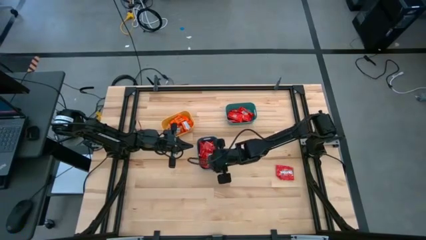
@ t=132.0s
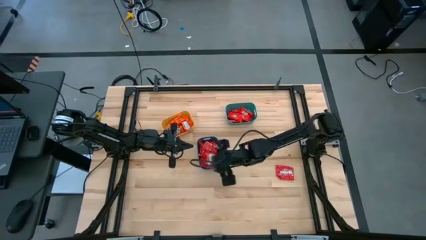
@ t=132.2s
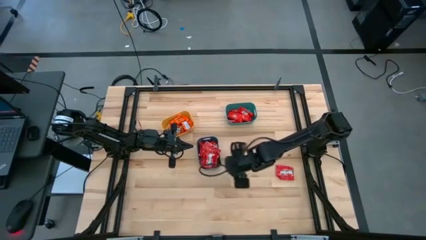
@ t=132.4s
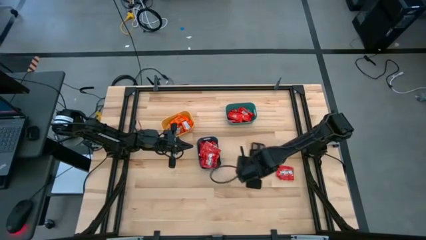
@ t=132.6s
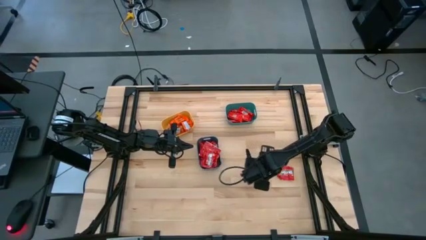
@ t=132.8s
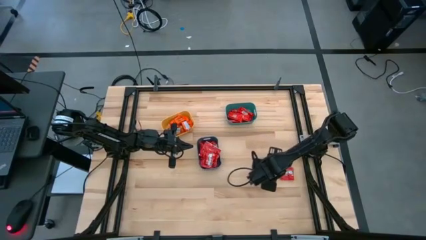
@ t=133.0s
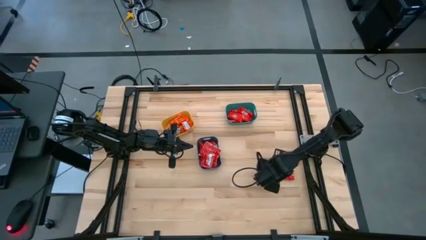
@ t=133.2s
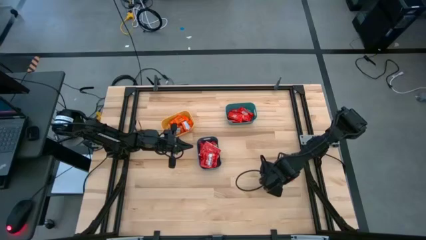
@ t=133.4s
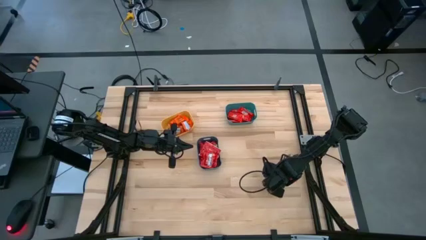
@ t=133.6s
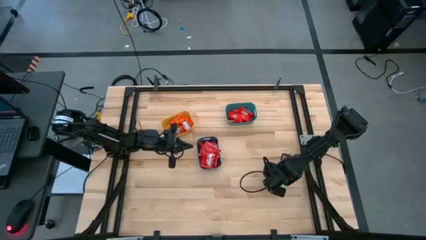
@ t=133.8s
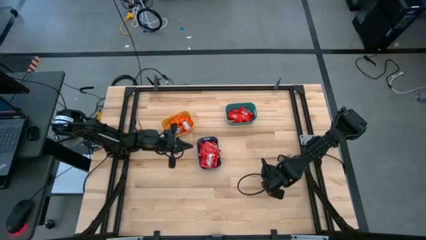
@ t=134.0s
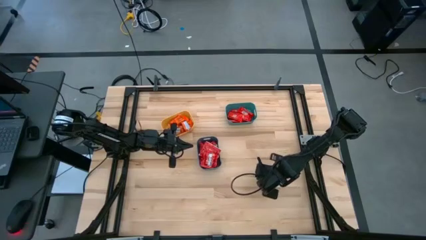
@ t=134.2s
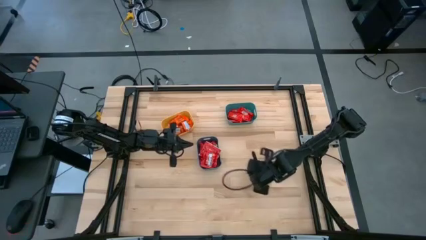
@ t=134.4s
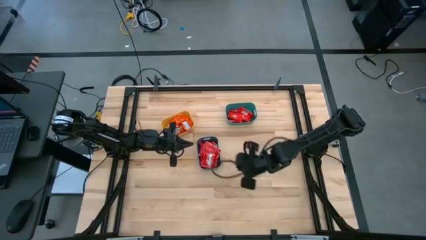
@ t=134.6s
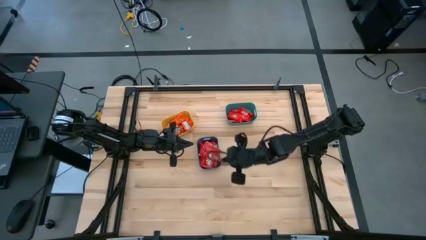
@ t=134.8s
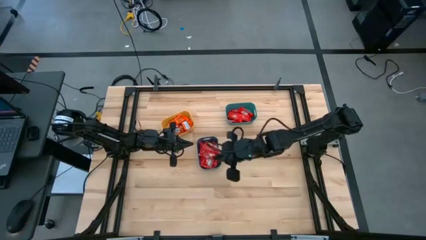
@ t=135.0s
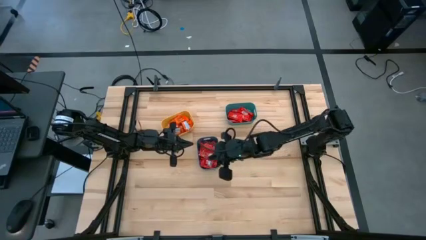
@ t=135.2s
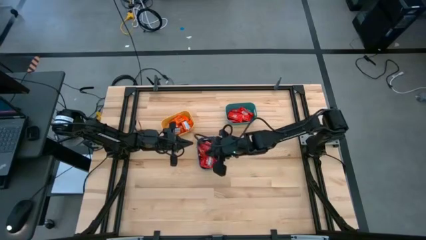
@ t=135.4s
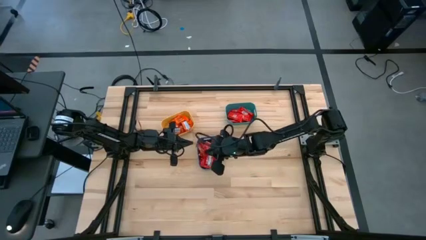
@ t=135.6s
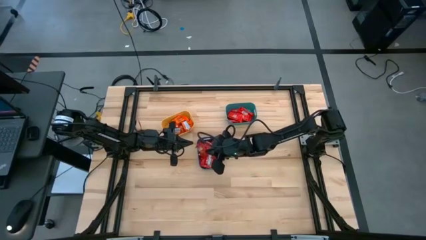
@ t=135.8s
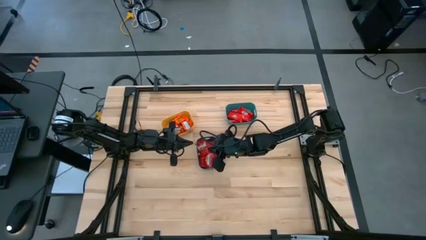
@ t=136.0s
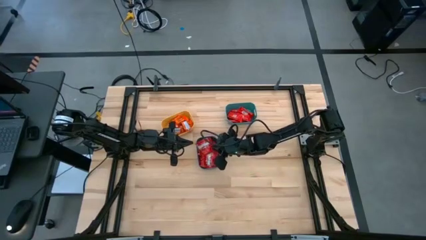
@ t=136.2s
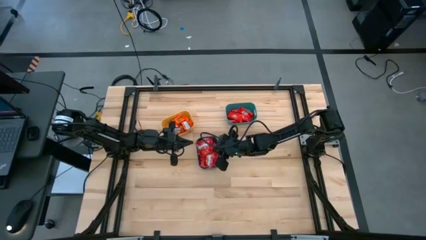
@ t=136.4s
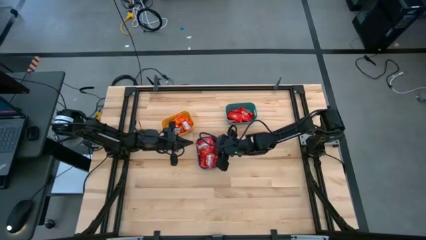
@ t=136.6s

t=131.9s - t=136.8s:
Task: Sort candy
Put the red candy into the blue bin

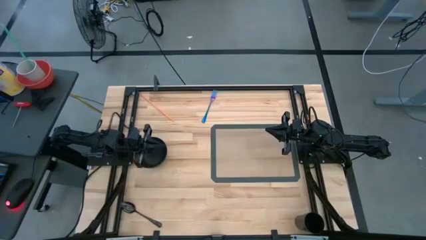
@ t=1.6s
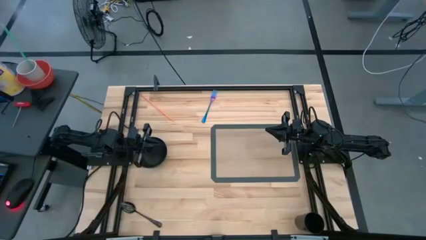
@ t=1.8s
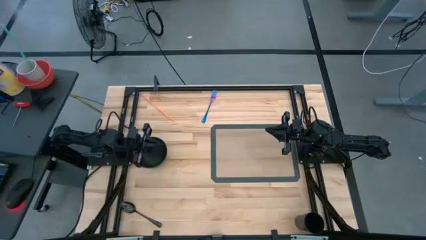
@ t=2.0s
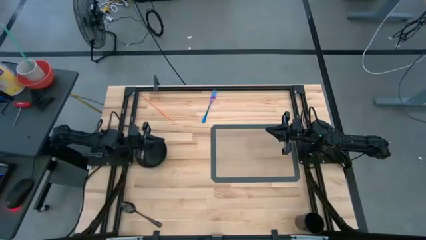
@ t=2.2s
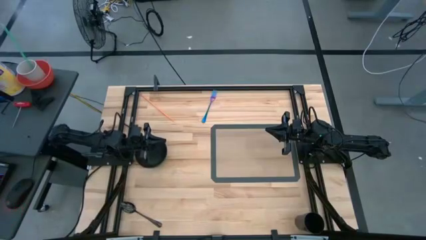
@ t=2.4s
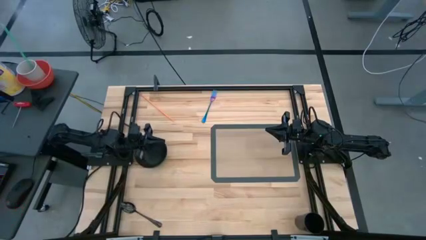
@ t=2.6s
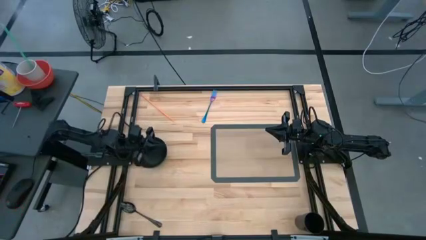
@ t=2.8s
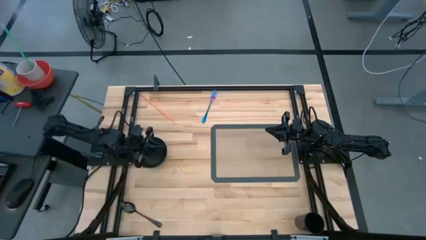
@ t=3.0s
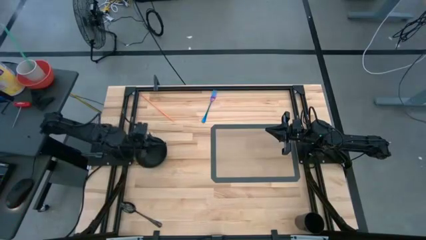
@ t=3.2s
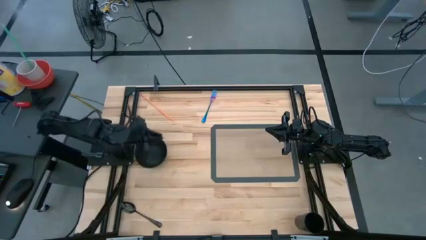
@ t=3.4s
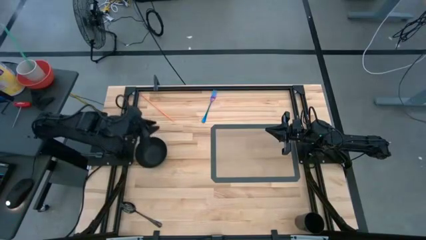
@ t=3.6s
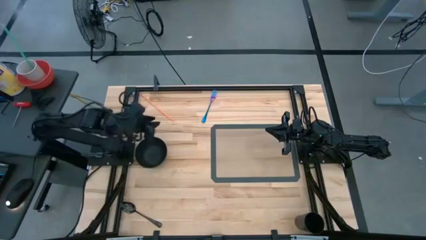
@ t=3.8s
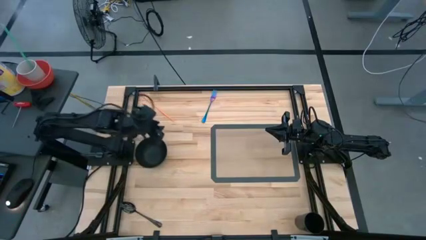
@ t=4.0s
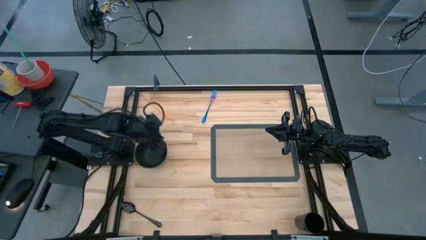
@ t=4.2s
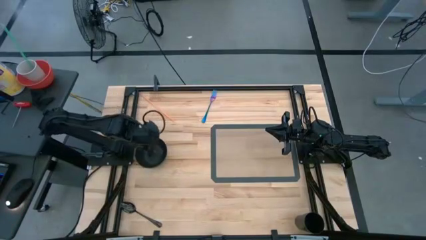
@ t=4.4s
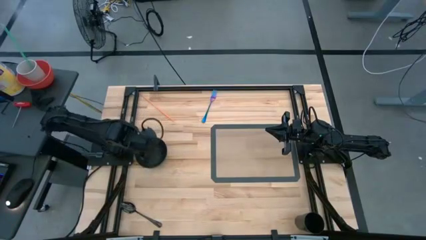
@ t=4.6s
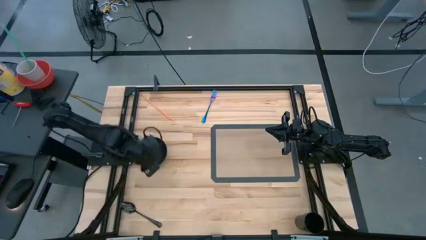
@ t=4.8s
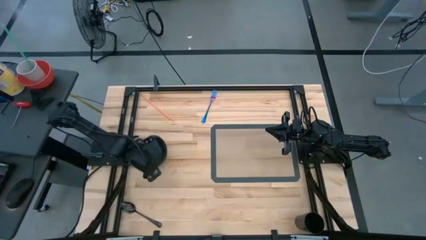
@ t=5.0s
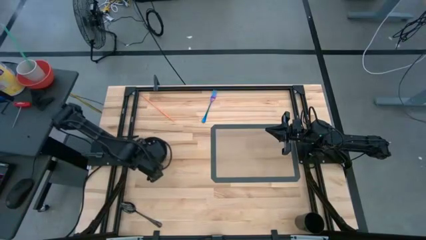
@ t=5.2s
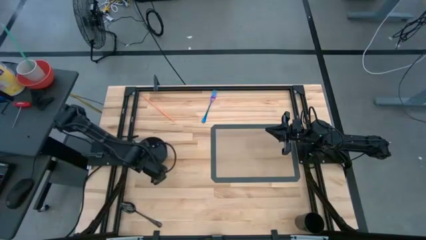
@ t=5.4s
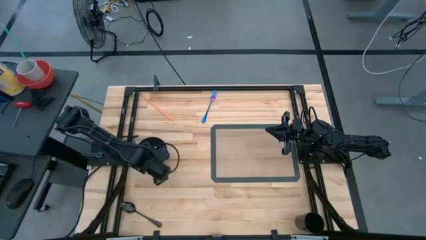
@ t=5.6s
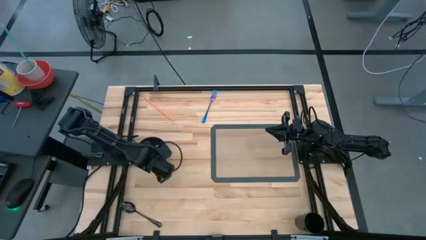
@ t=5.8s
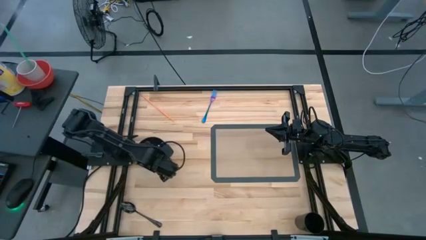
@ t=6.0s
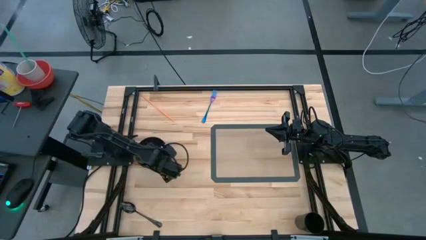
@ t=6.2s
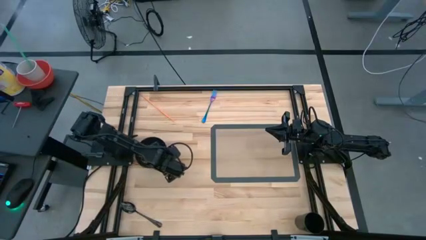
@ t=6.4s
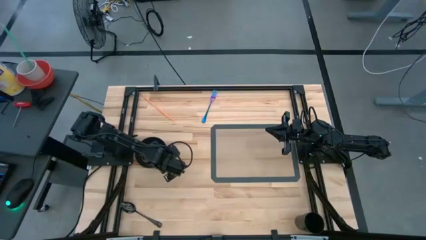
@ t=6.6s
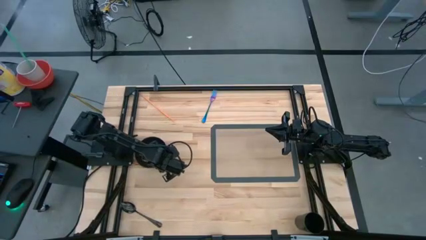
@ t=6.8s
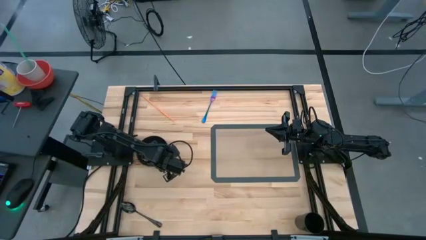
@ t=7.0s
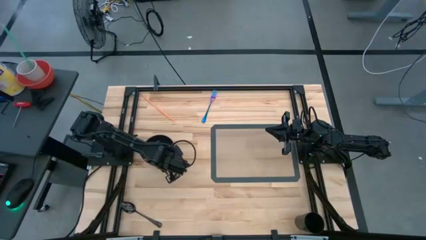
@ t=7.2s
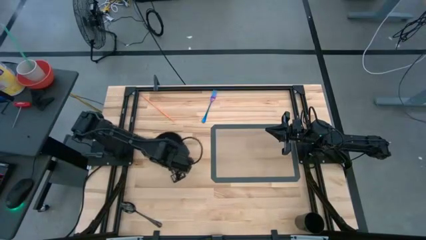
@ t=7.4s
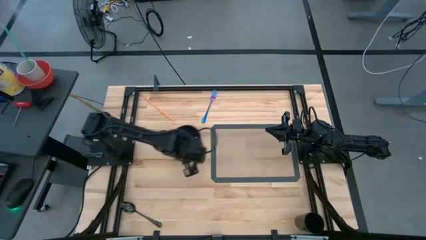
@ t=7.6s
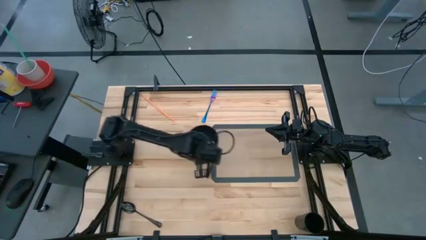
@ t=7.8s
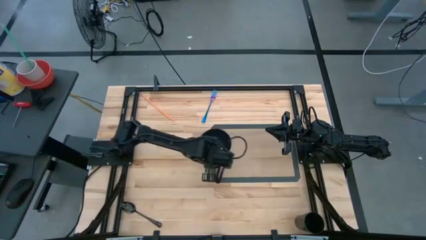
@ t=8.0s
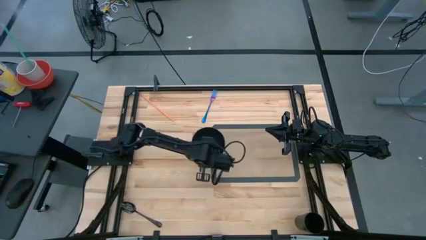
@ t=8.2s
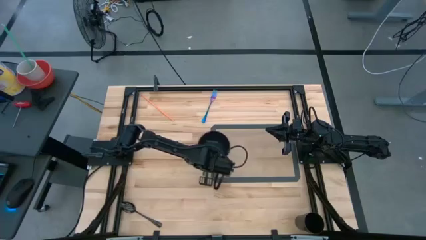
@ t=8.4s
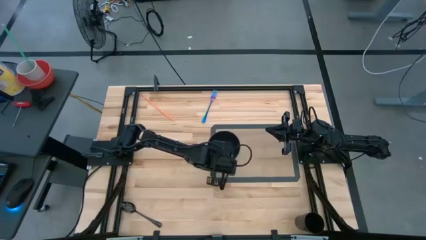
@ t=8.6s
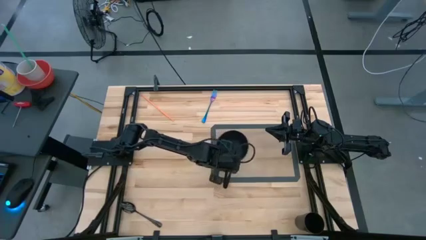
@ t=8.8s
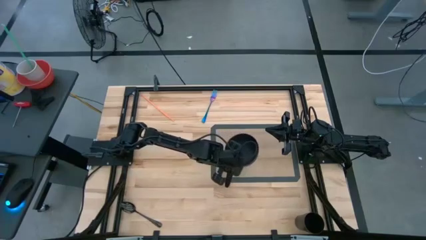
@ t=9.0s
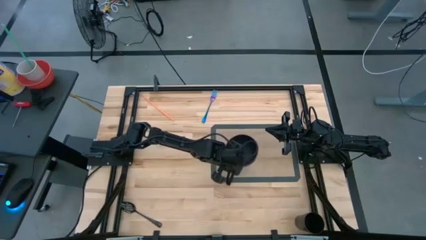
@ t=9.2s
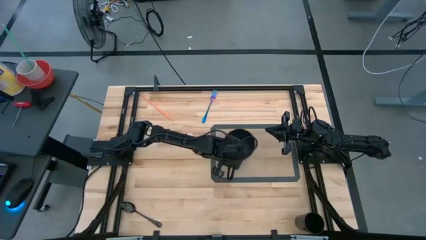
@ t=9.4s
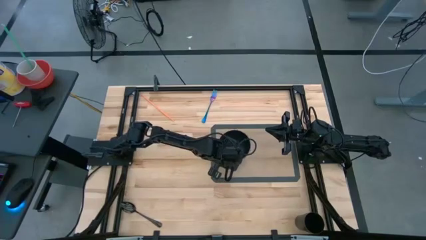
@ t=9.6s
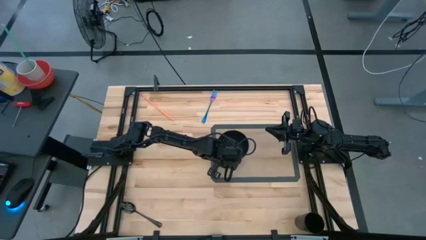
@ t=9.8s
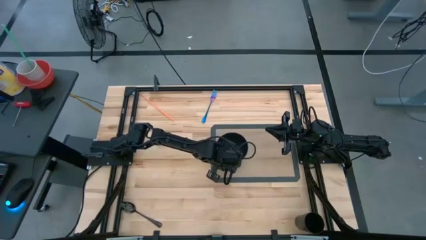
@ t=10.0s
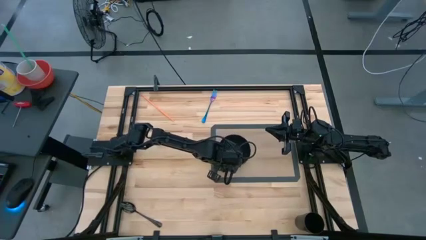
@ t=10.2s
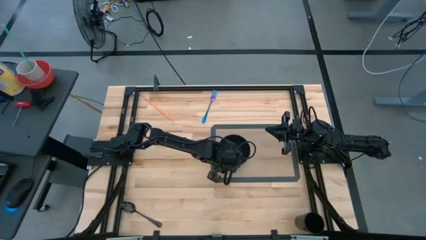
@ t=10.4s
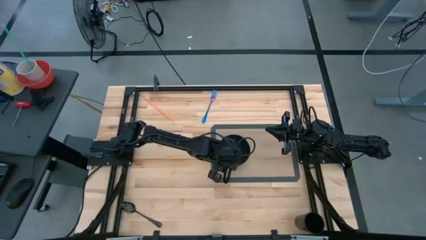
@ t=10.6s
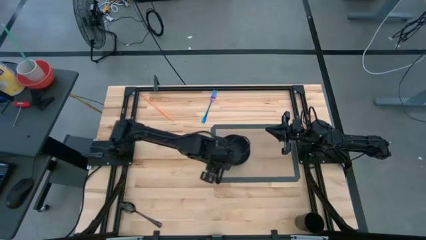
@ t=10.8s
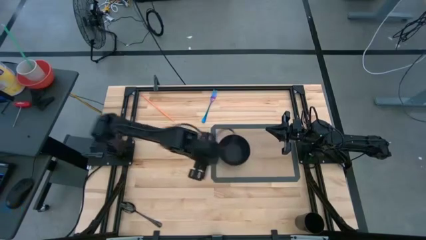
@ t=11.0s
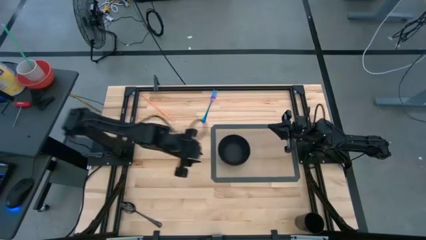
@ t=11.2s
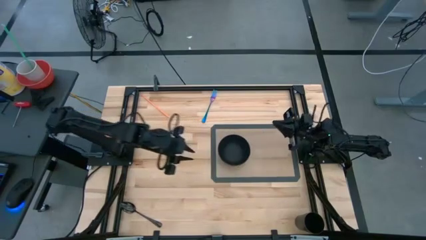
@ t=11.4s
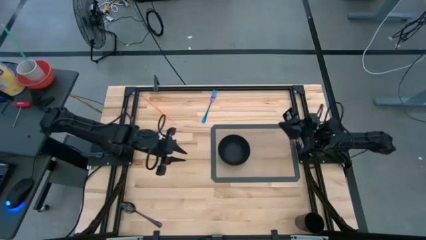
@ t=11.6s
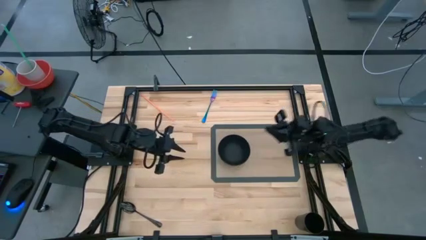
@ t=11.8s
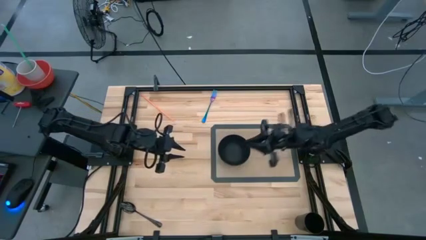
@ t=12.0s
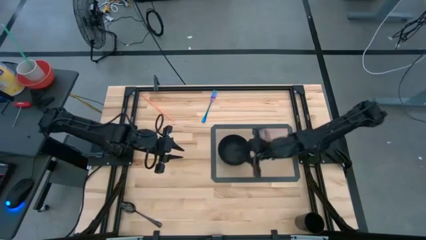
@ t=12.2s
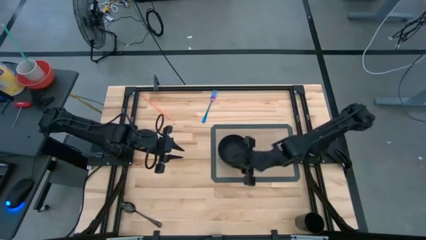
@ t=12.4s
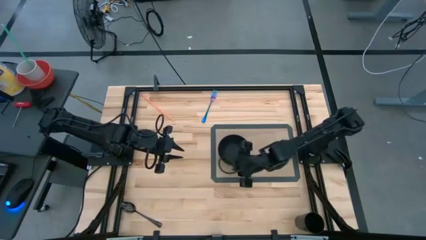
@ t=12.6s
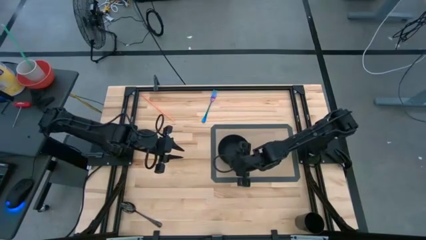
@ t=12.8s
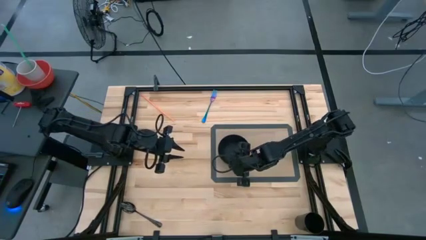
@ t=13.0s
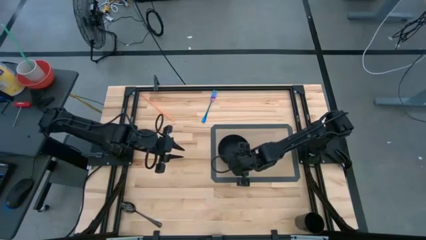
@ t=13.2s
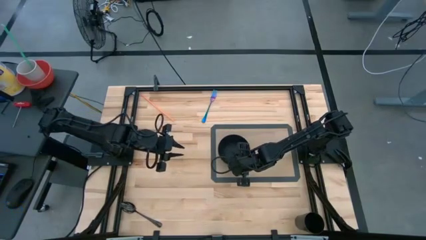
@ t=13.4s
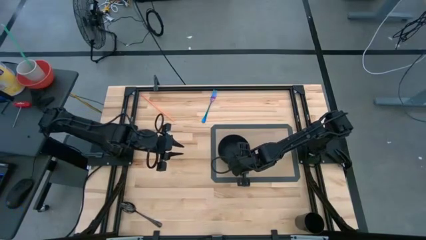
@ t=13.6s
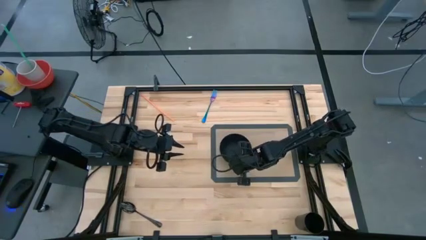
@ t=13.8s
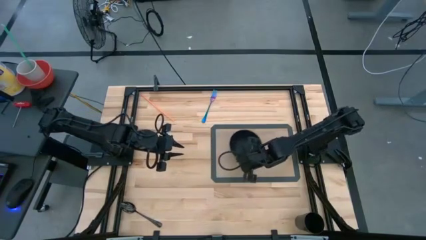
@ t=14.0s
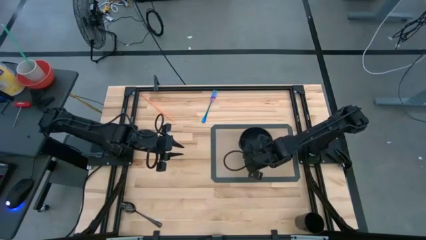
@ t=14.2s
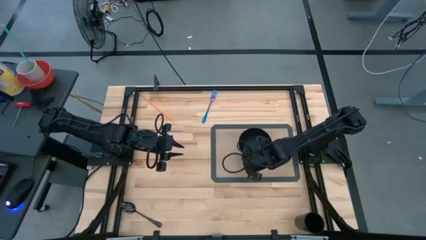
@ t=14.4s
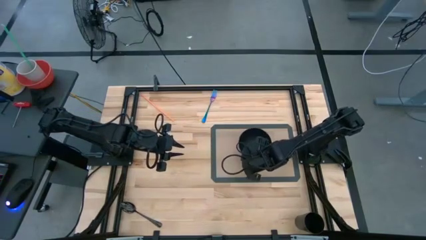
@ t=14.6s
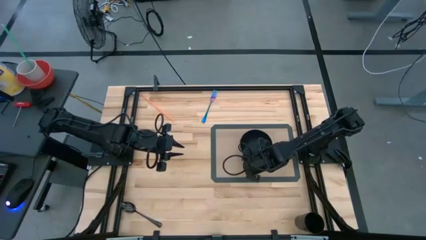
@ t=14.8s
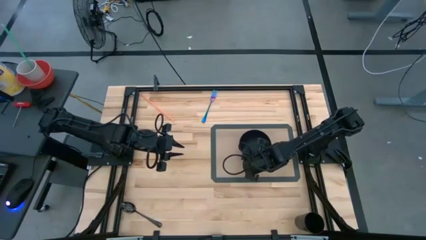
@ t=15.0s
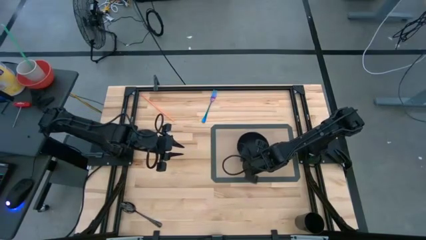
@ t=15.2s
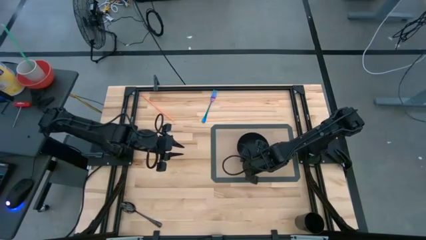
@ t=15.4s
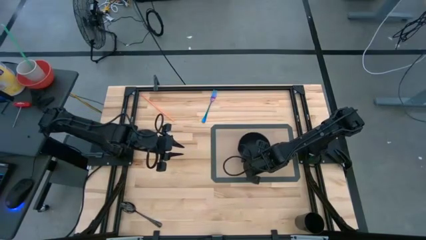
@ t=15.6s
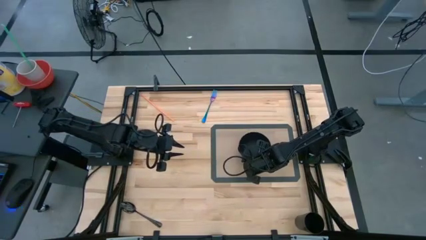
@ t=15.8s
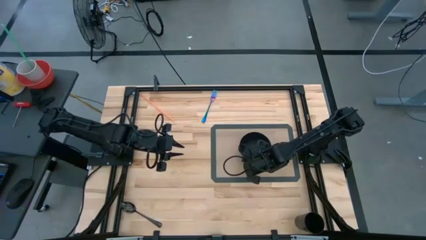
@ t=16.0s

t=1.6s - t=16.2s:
Task: Pick & Place Utensil
Put the black bowl on the center of the mat
